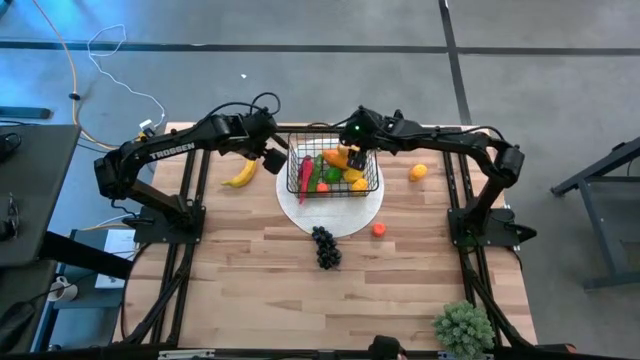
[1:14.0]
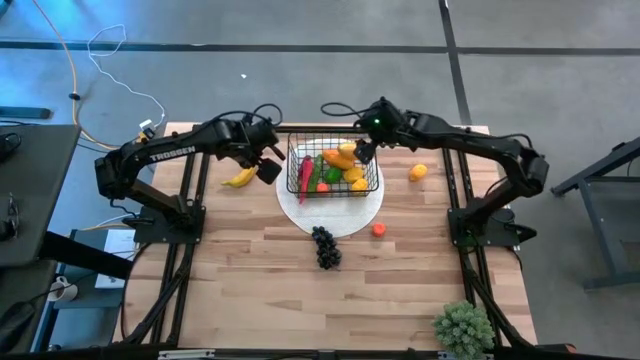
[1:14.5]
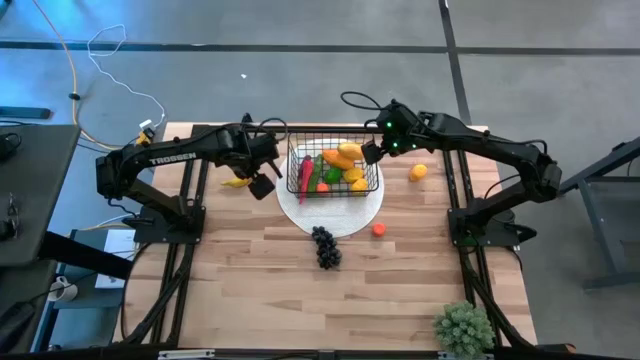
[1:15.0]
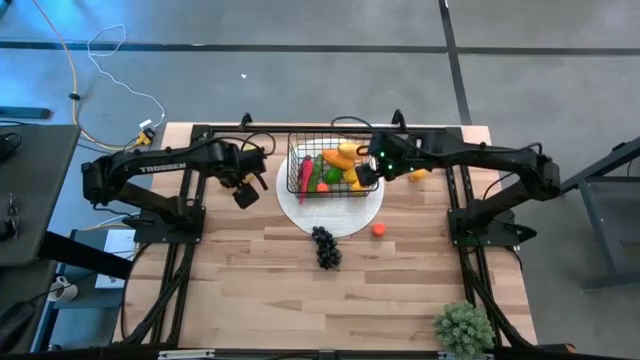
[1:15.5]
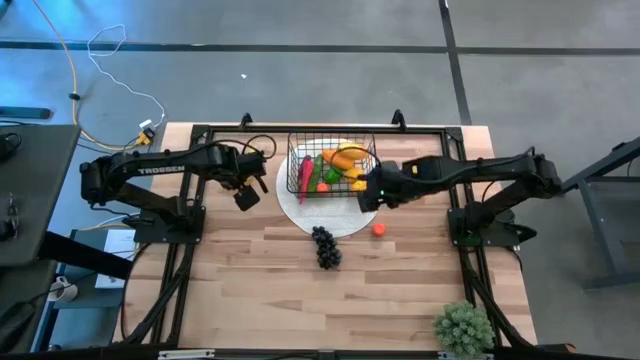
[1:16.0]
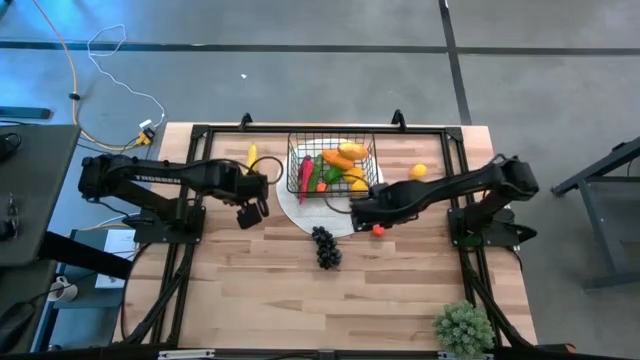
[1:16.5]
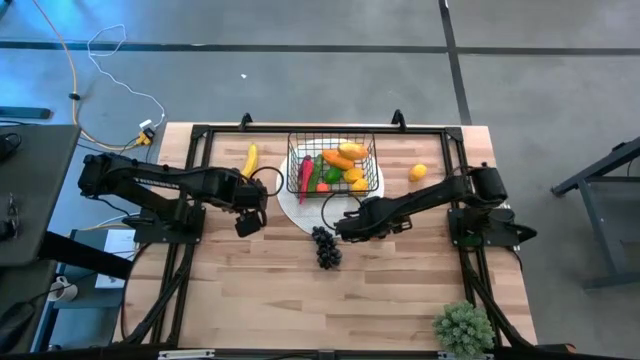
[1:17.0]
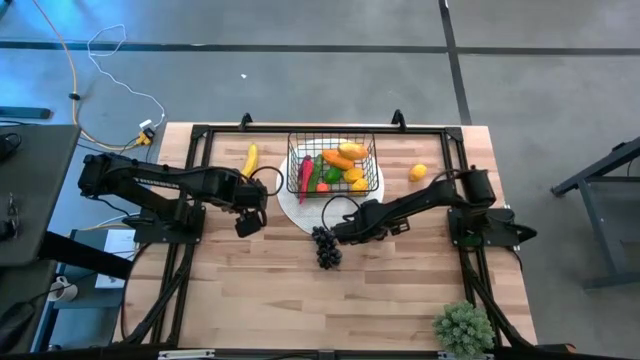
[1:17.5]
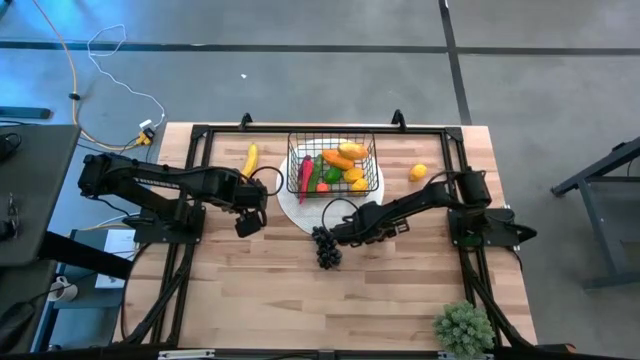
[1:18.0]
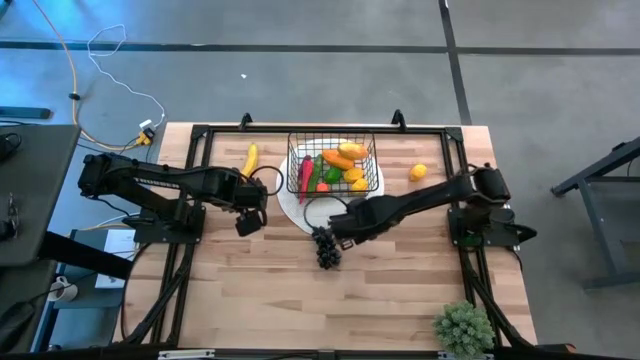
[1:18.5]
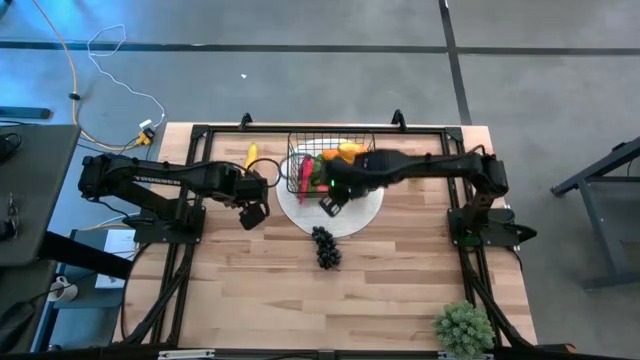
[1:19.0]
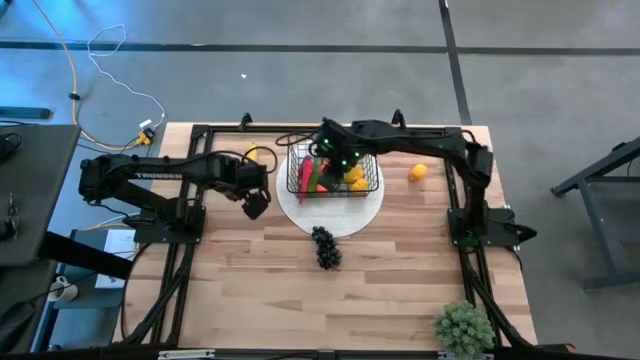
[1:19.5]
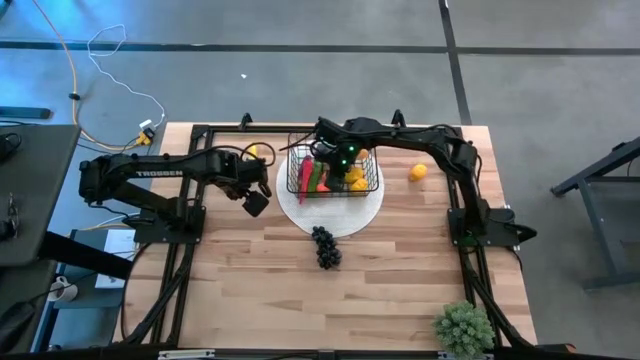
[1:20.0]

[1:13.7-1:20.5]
Task: Build produce basket
Put the orange into the wire basket

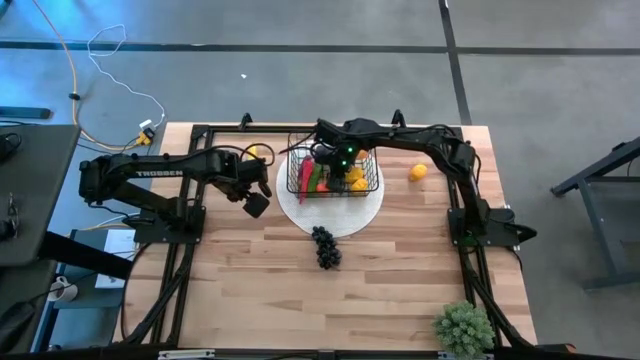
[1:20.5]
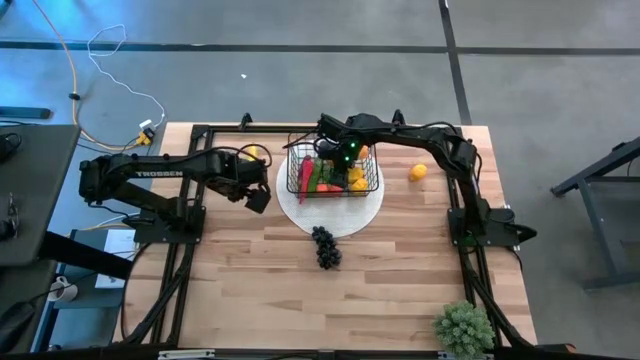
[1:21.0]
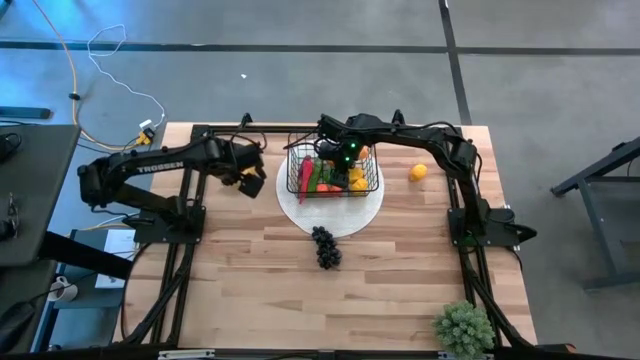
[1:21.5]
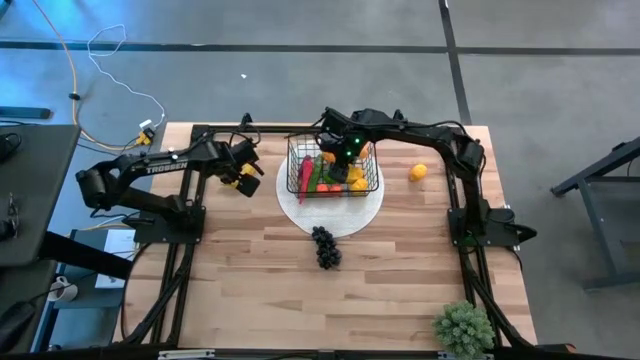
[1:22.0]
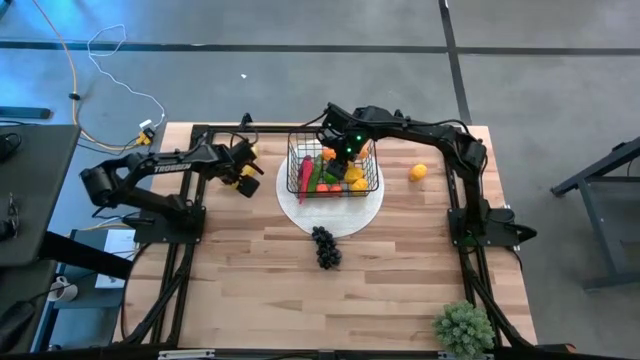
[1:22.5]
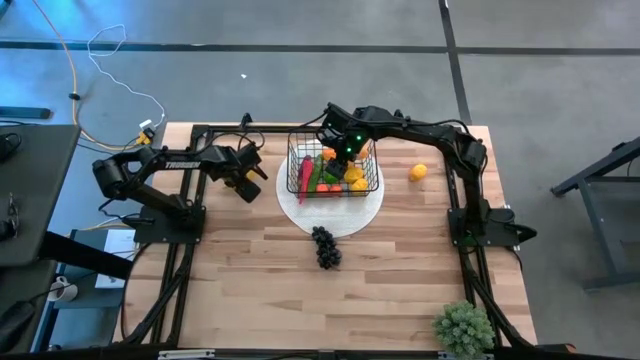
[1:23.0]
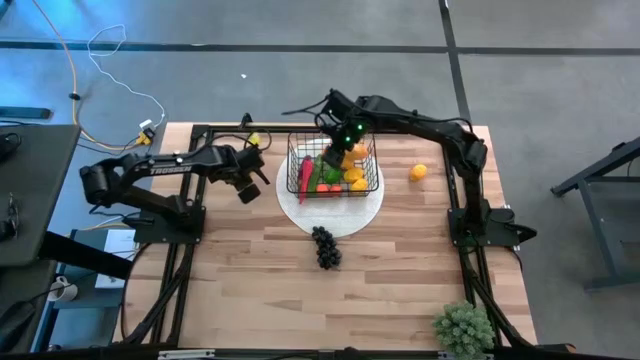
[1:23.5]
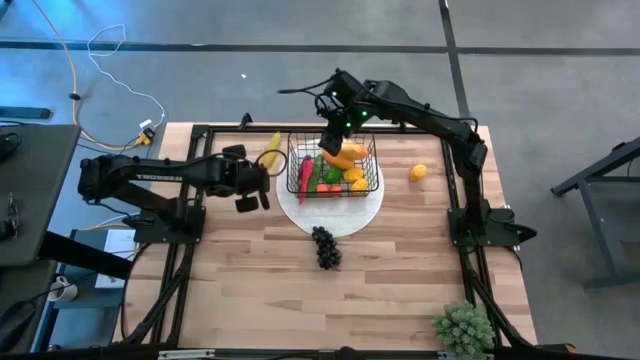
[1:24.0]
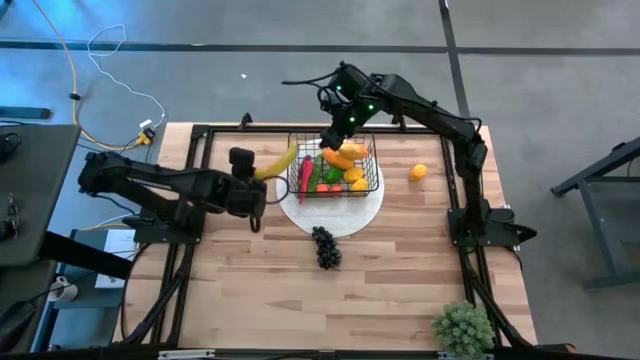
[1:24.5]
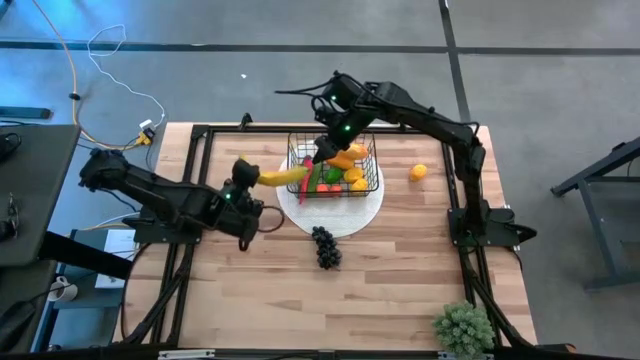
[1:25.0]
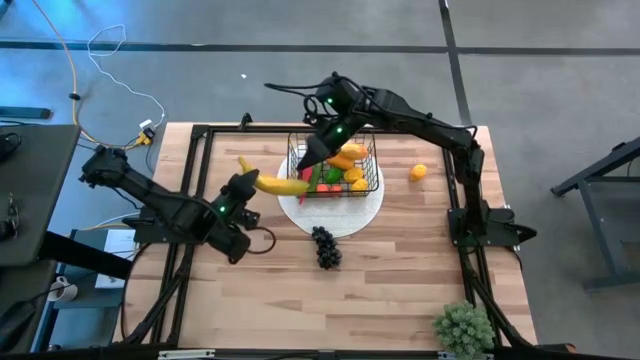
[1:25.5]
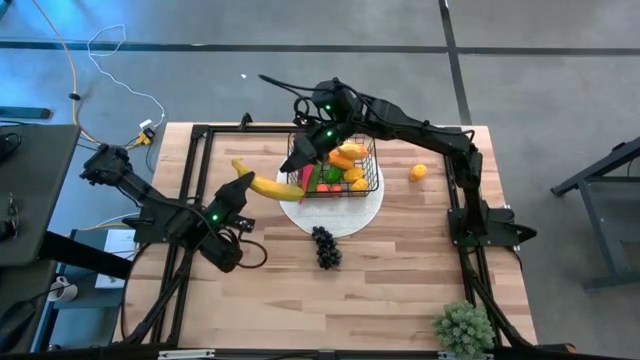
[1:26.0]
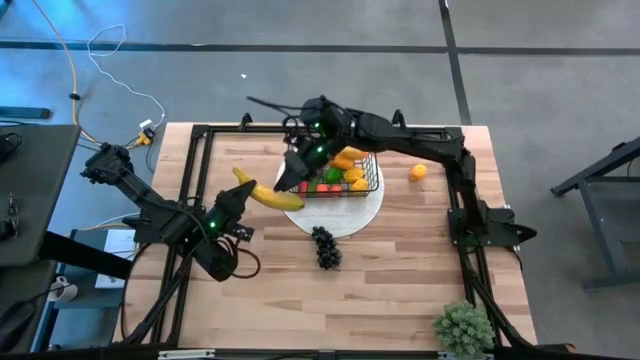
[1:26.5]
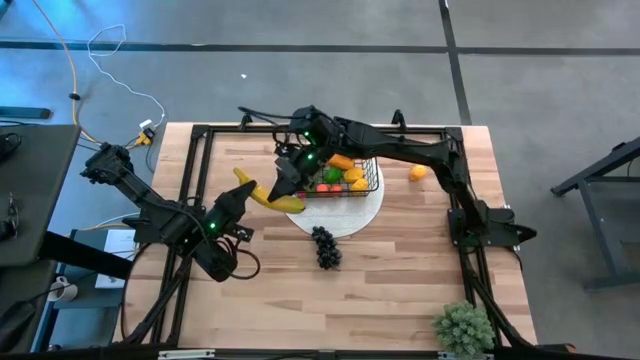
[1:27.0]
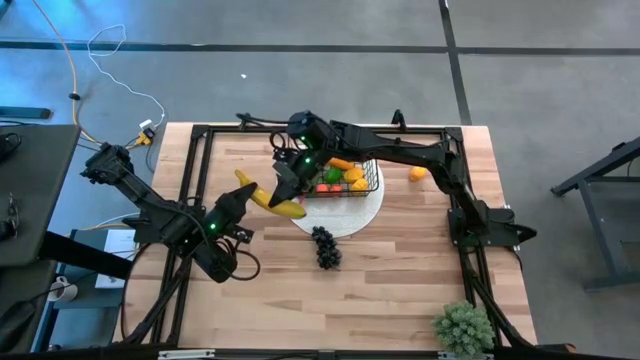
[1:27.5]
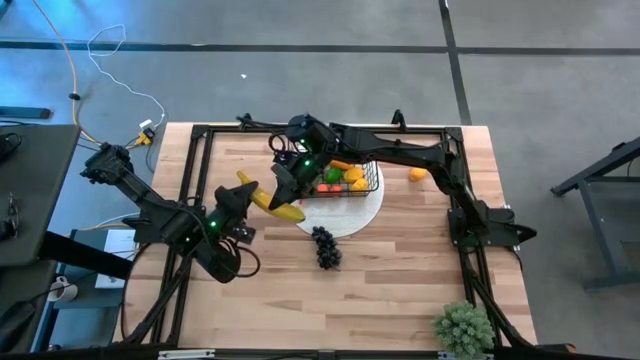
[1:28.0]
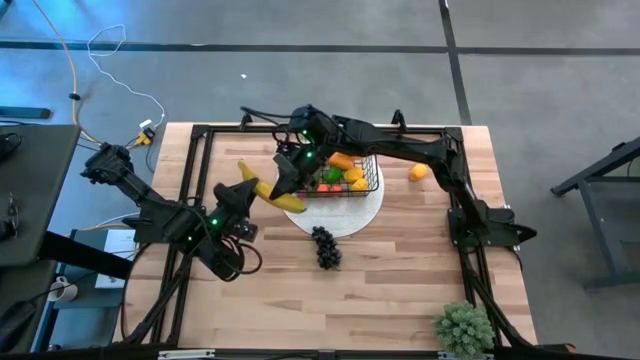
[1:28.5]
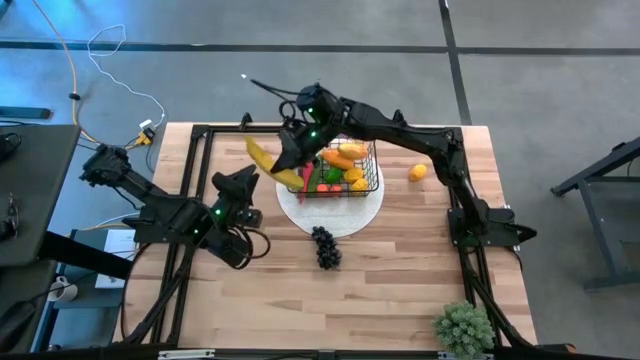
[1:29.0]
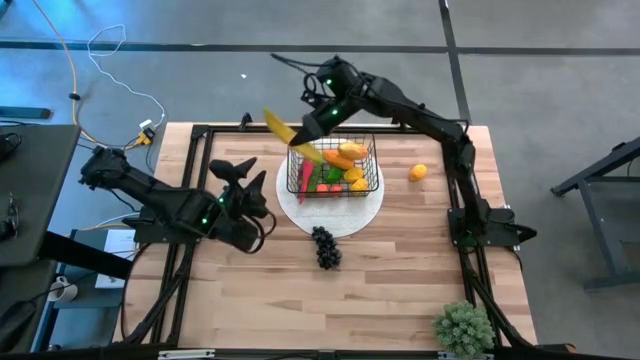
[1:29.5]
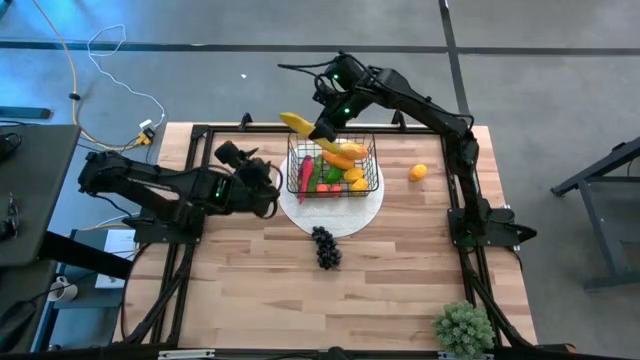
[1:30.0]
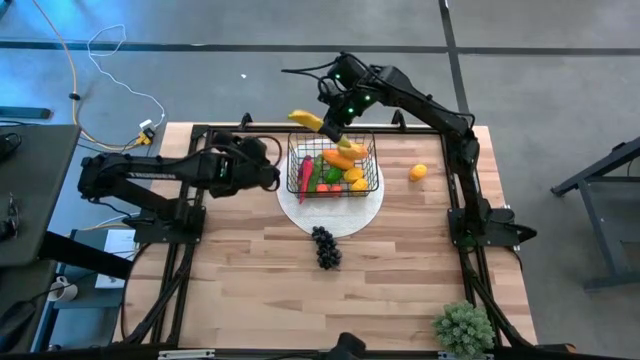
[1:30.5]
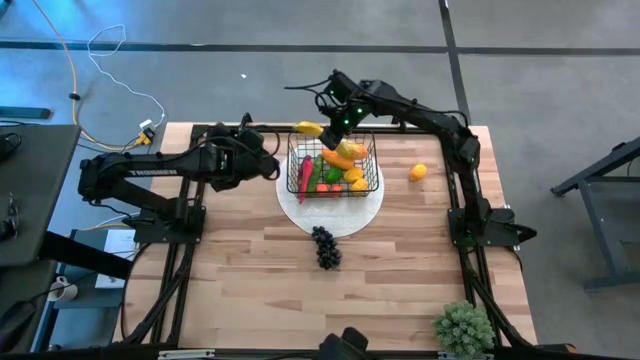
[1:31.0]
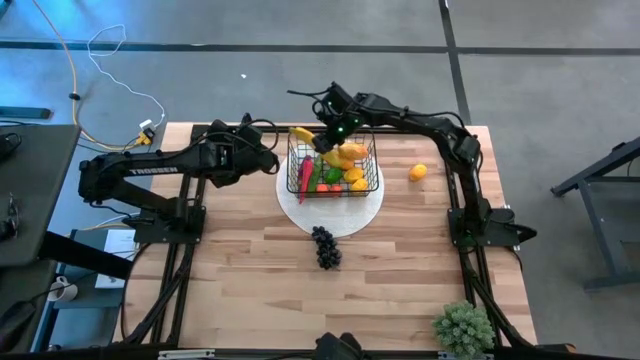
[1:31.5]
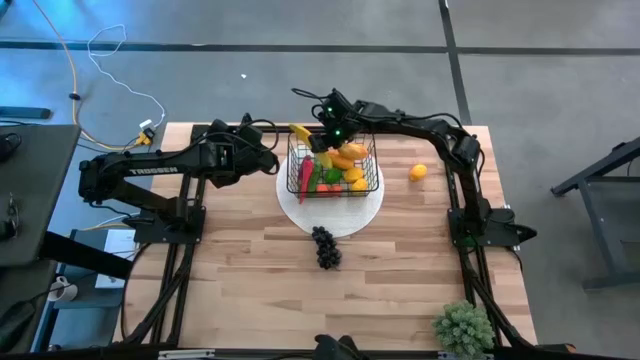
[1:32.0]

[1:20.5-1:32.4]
Put the yellow banana into the wire basket

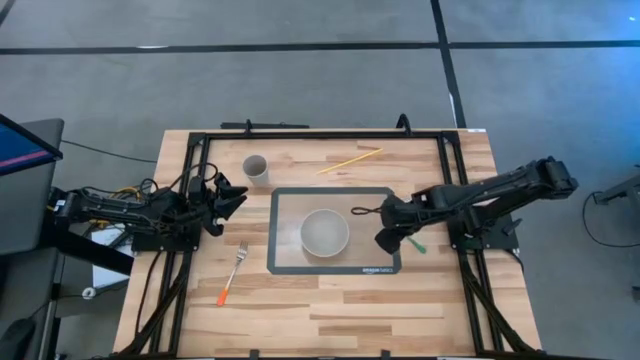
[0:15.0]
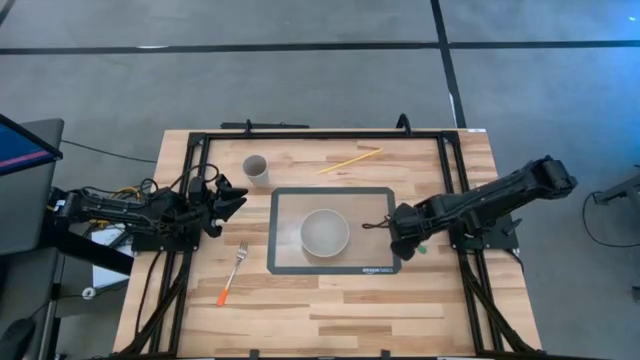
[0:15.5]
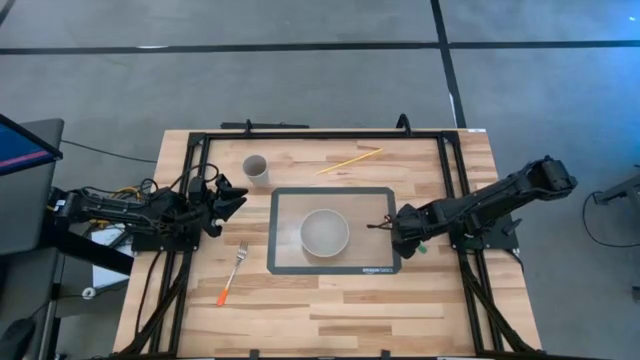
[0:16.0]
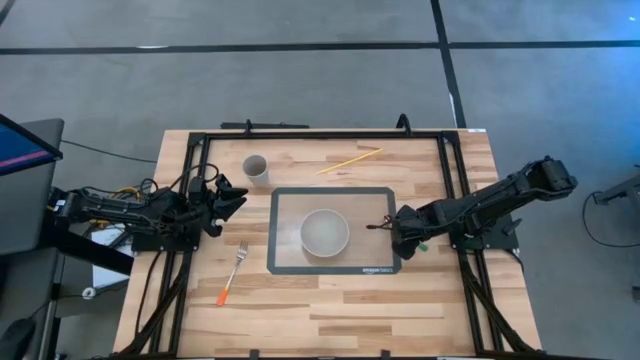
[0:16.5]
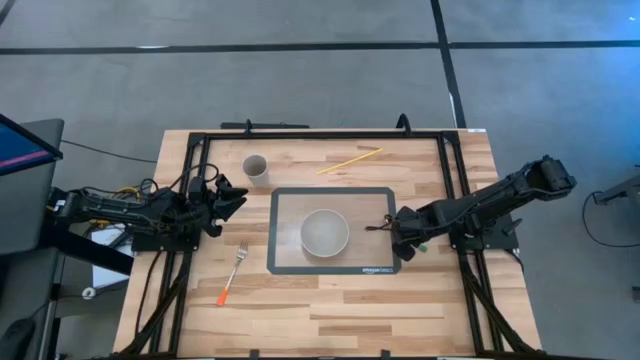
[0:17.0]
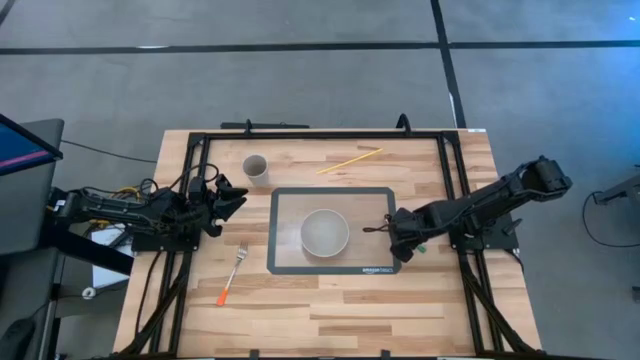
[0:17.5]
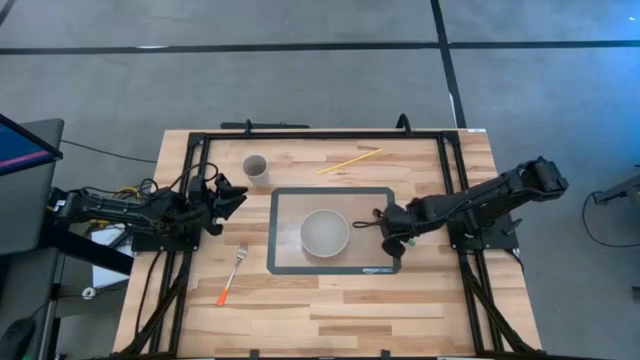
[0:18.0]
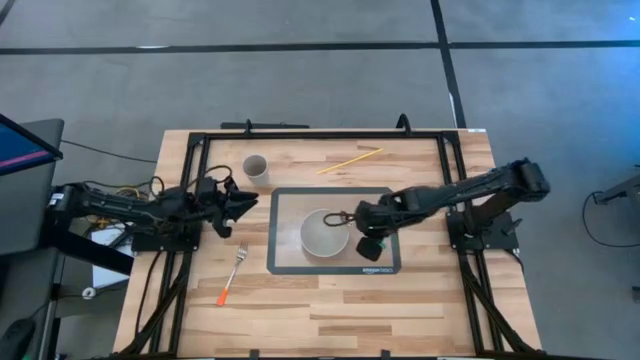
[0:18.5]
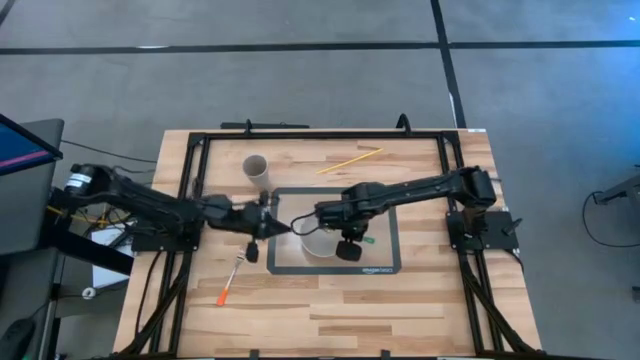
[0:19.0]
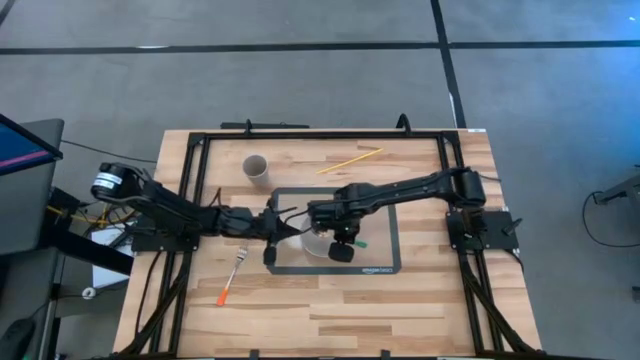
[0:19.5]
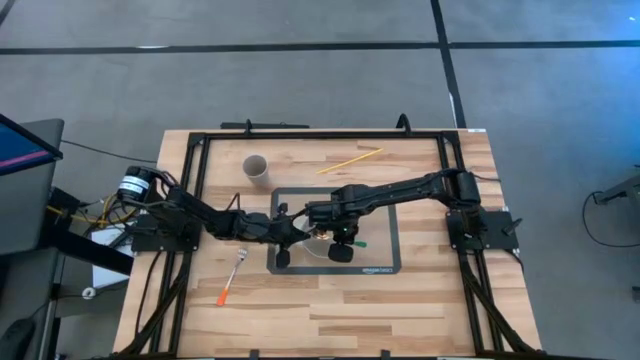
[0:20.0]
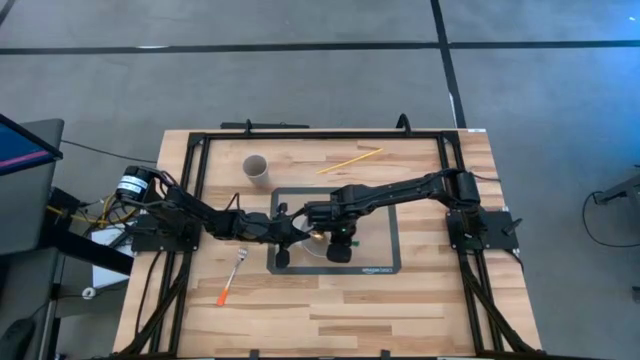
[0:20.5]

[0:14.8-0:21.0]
Task: Pick & Place Utensil
Put the green spoon into the white bowl
